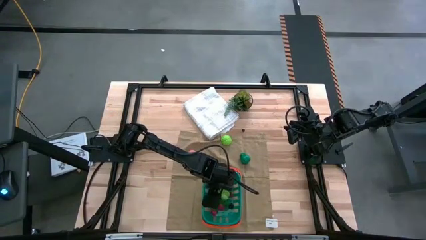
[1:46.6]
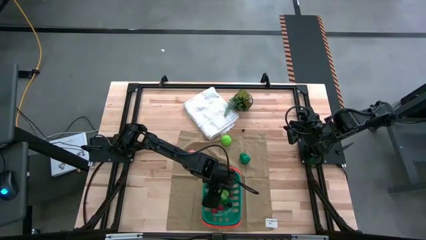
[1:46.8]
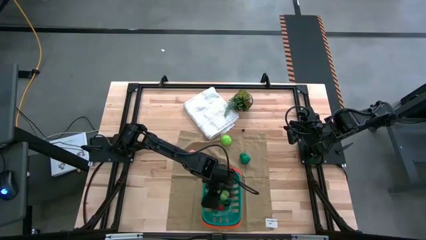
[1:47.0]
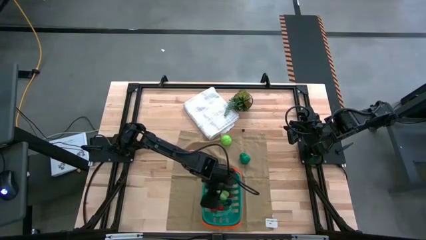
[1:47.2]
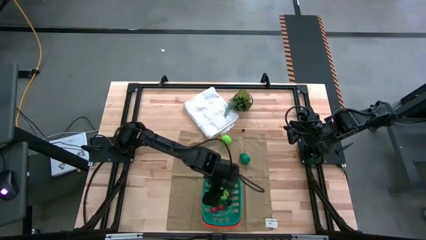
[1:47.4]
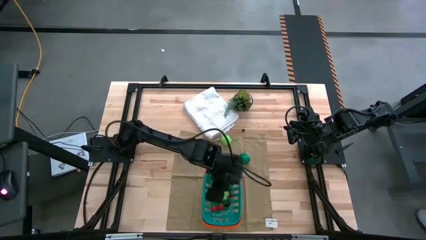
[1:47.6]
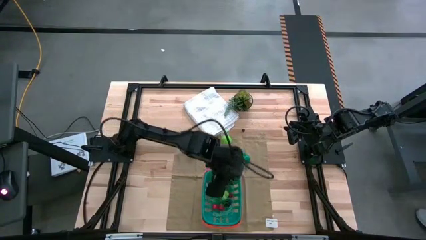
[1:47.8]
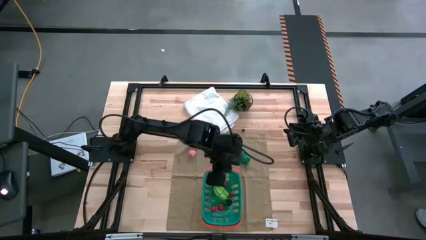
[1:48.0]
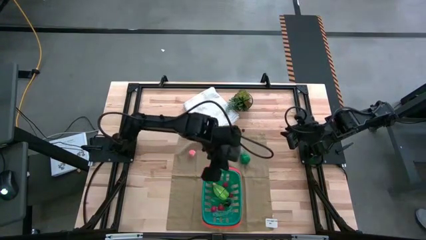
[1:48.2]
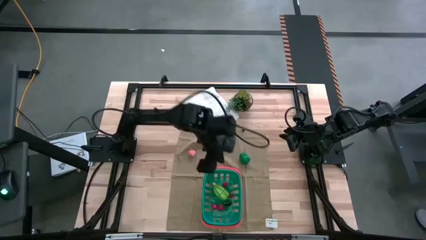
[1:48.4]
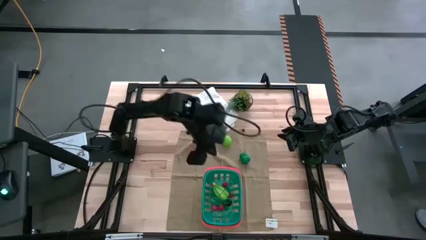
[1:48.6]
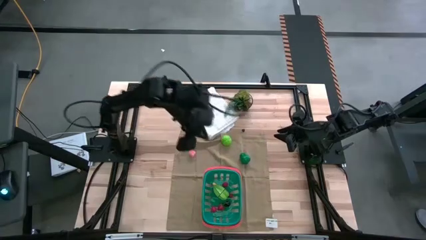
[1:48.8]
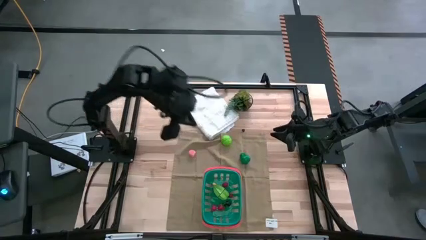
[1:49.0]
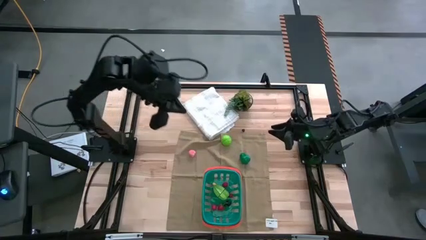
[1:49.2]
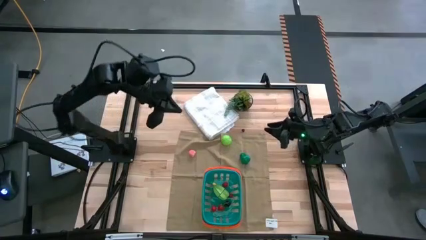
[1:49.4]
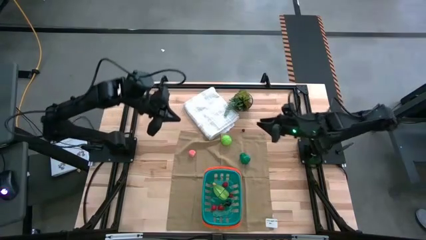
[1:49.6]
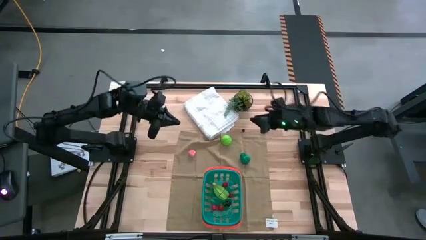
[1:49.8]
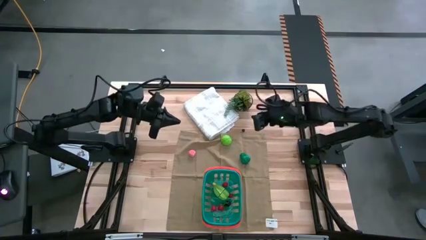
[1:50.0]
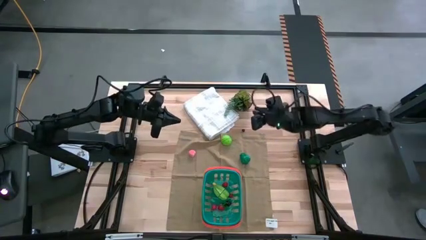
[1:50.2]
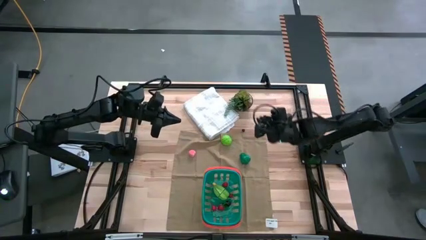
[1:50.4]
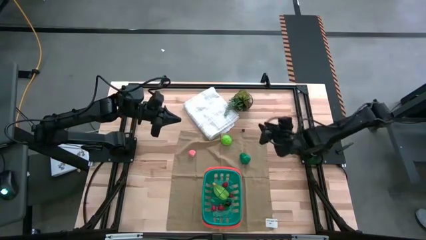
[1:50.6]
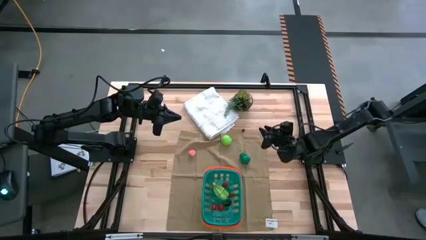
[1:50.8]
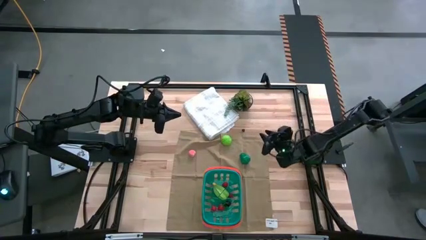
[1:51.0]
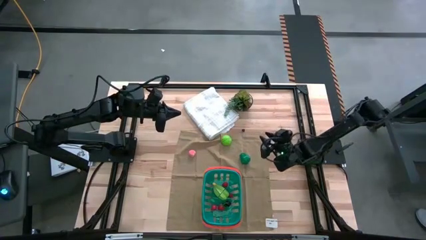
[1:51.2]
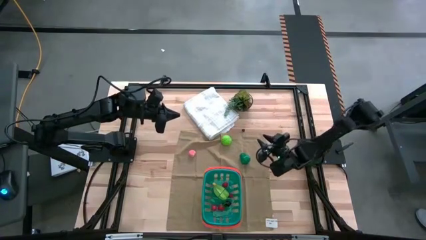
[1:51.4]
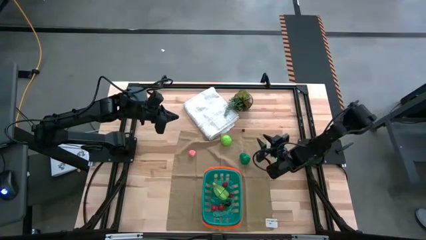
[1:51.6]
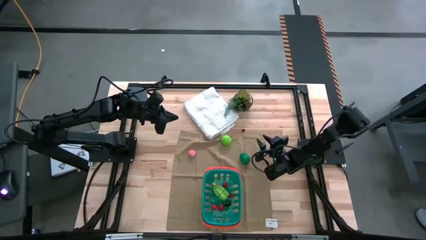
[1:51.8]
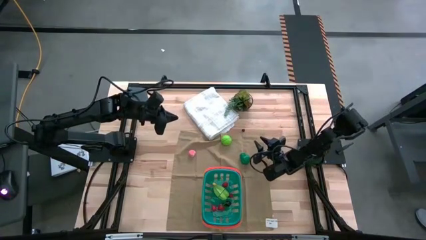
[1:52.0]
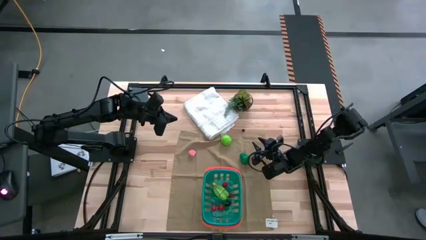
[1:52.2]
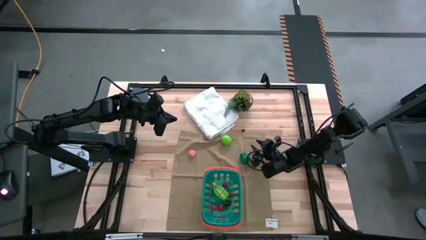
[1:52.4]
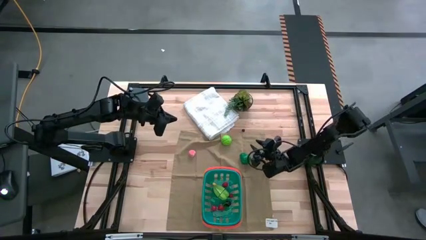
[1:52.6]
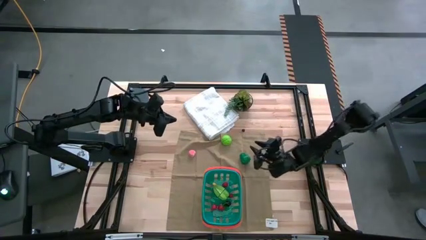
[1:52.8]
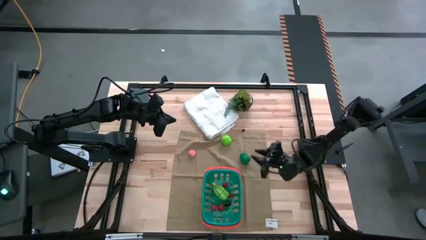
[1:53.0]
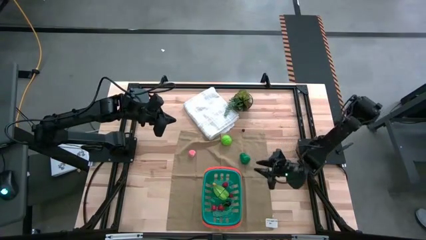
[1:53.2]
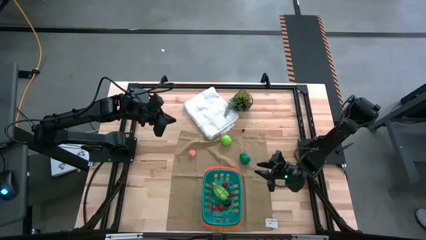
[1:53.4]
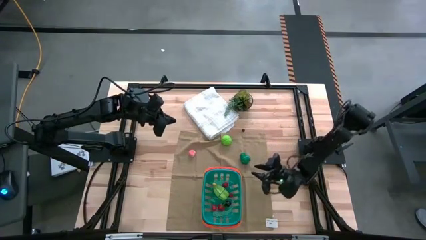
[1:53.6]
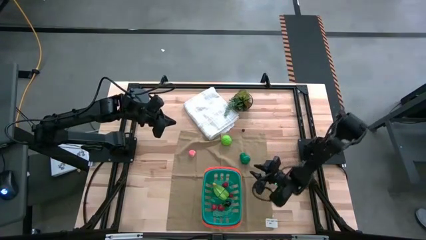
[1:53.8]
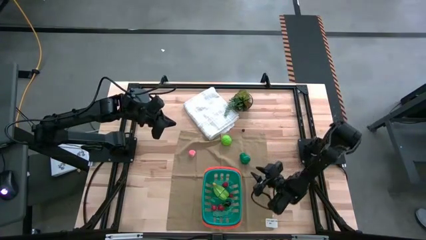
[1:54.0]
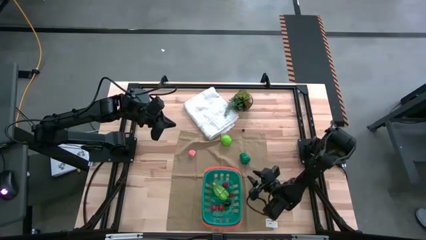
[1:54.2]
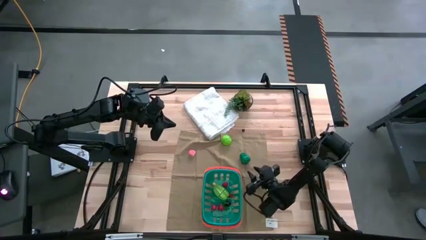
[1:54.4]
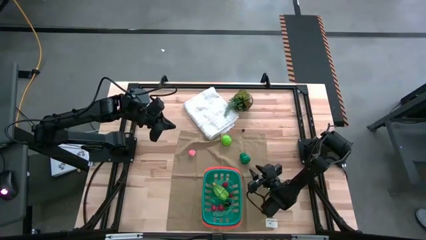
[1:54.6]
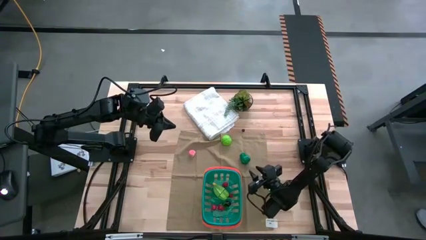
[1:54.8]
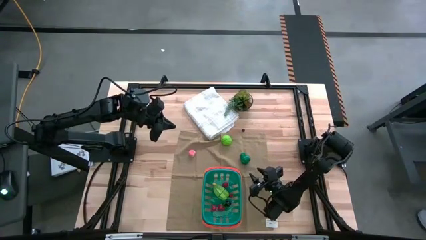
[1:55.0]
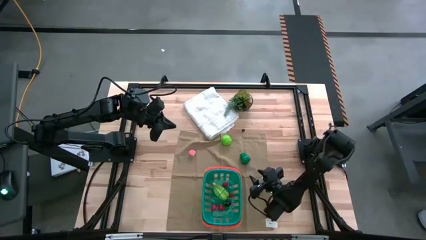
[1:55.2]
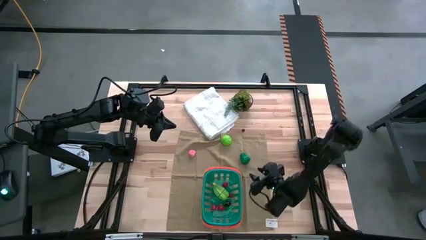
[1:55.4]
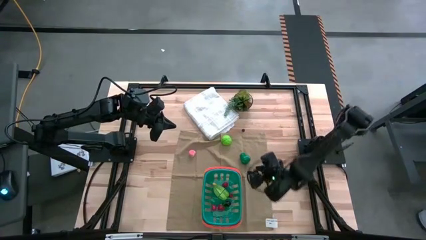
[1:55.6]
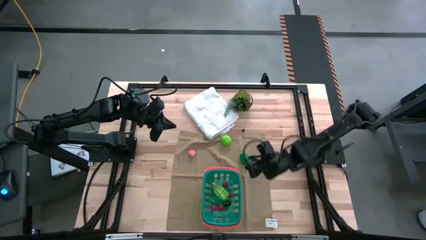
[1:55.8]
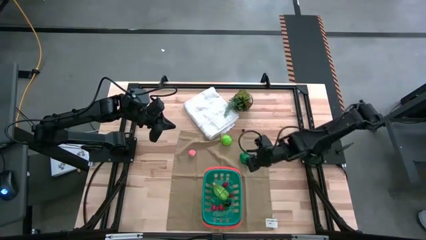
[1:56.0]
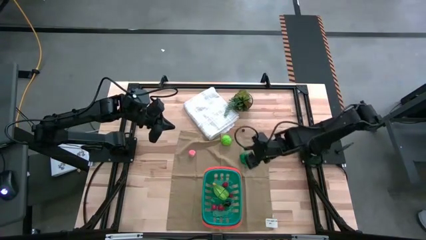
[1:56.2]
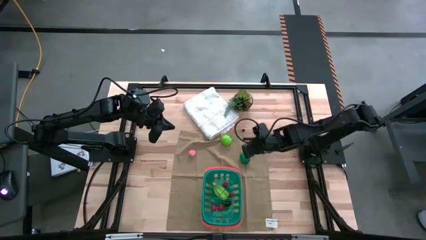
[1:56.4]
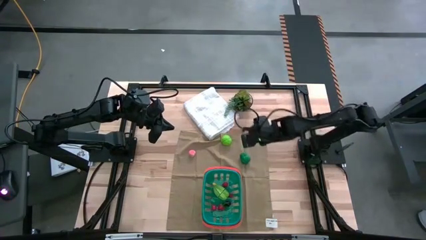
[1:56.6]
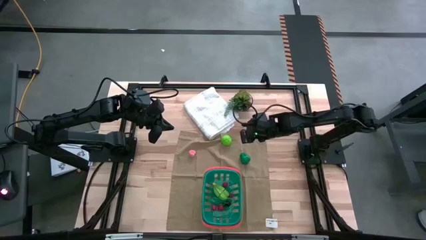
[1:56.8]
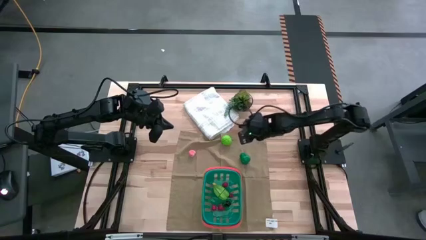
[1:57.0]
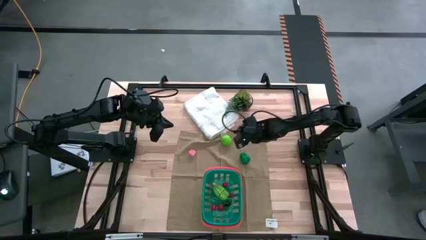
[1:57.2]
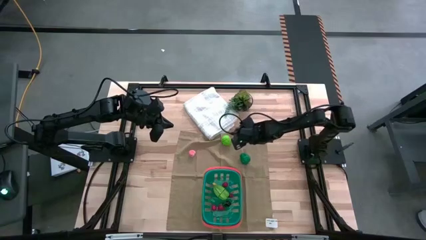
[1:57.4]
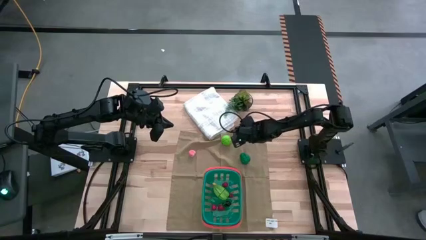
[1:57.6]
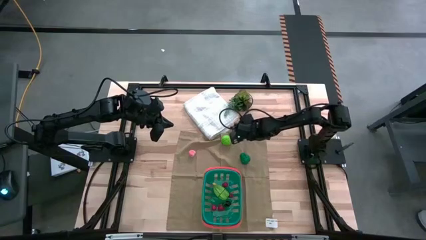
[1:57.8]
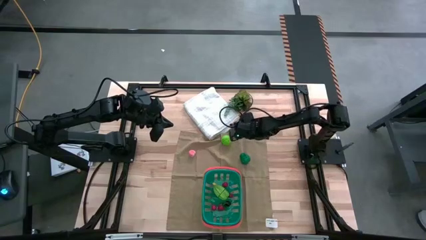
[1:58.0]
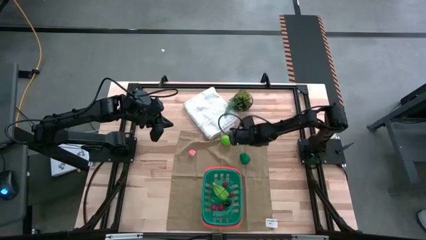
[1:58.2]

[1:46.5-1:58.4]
Task: Pick and placing Produce into tupperware
Put the blueberry into the blue bin

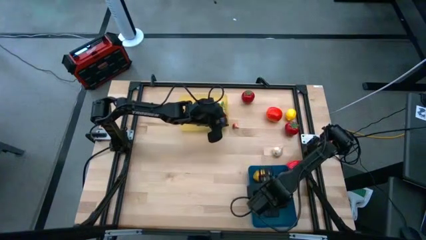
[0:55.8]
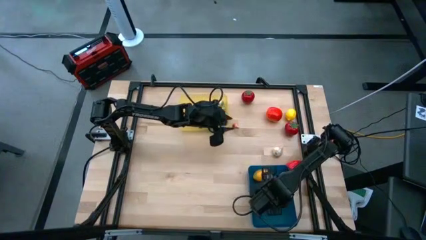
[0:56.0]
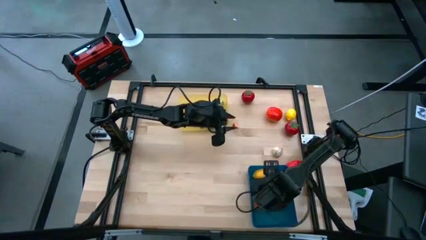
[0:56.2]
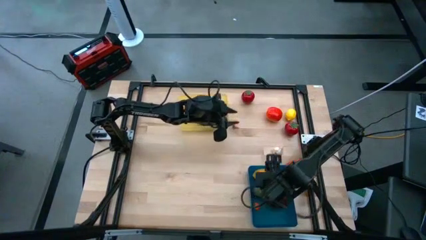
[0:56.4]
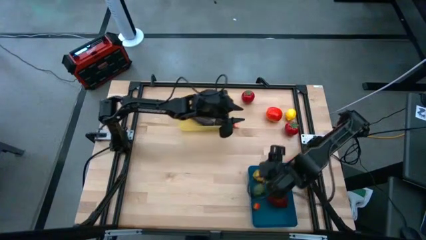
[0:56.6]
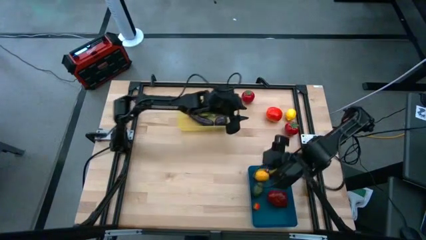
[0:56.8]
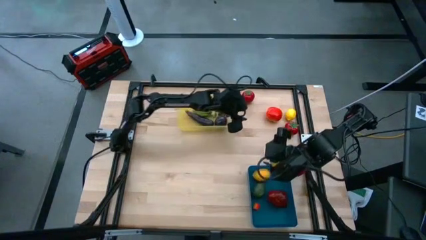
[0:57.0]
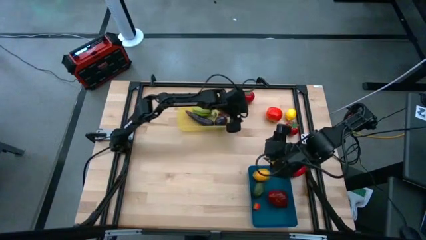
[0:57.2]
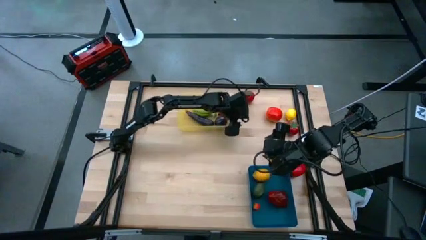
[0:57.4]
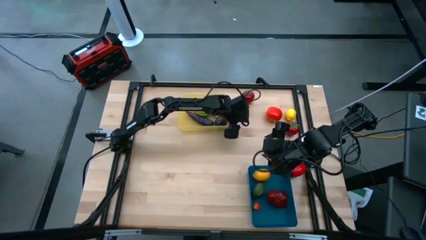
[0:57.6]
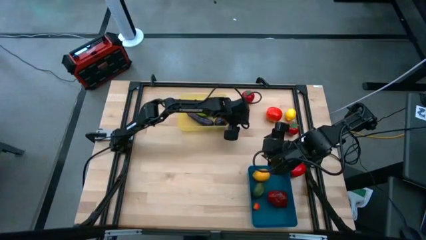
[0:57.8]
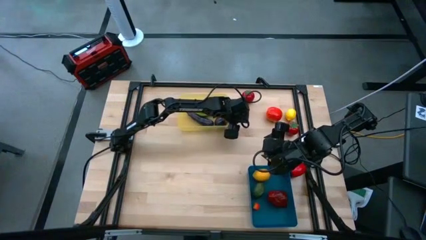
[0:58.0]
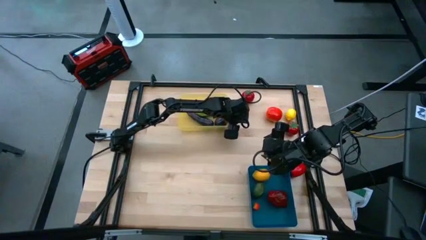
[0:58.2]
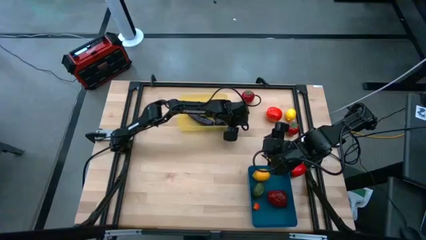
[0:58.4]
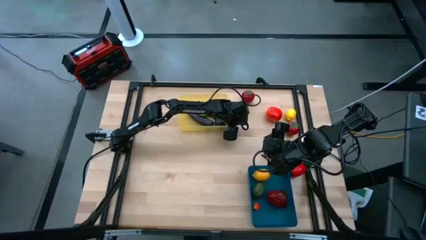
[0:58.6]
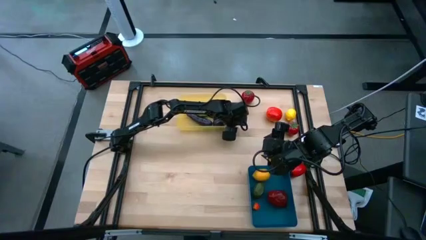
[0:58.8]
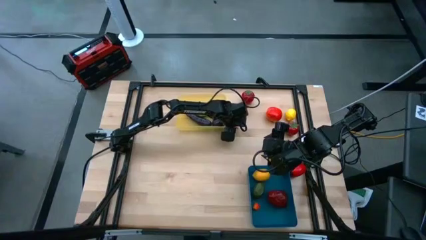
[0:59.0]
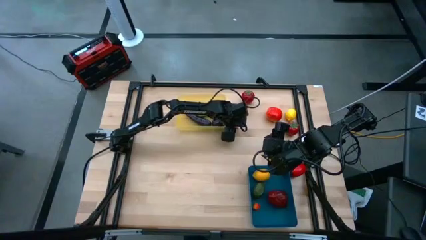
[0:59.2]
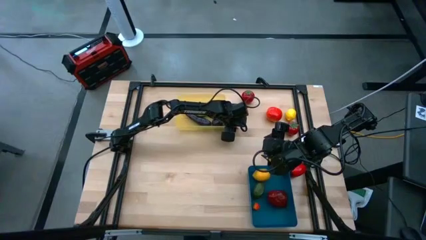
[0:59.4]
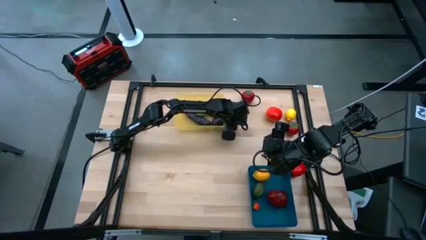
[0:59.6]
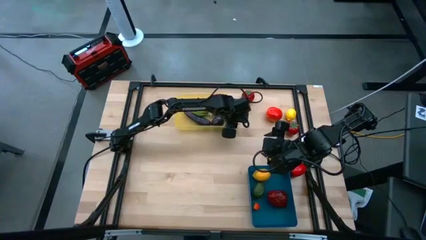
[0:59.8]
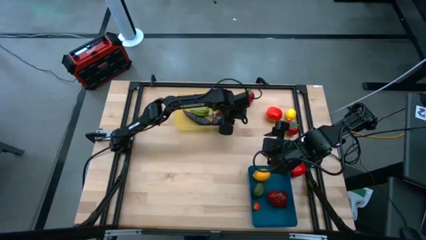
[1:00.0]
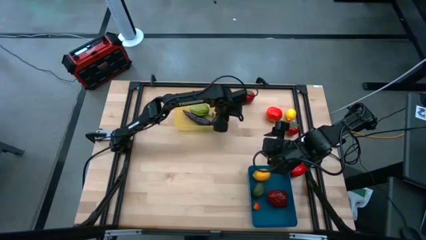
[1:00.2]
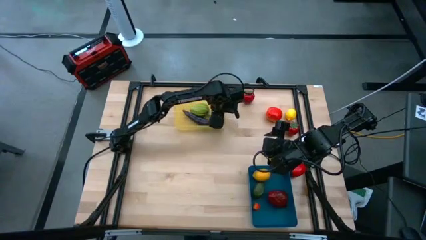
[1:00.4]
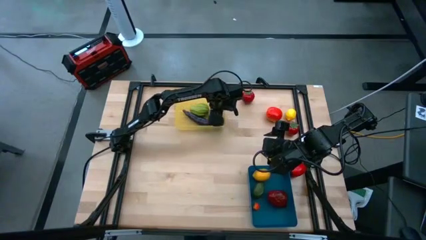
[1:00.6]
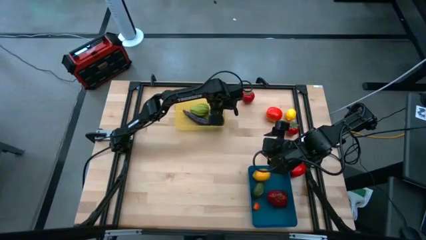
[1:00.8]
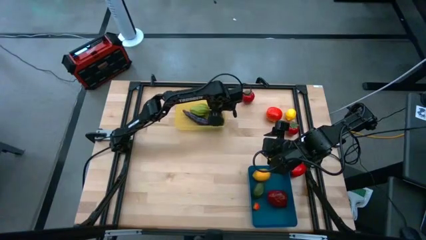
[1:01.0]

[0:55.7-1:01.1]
Task: Sort produce into baskets
Put the red mushroom into the yellow bin
